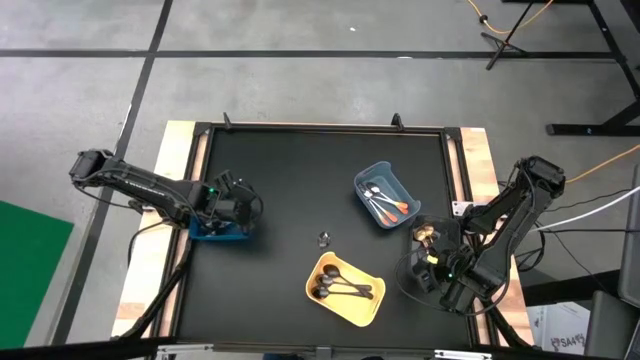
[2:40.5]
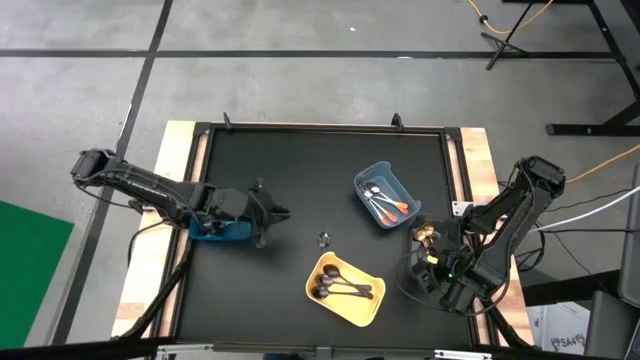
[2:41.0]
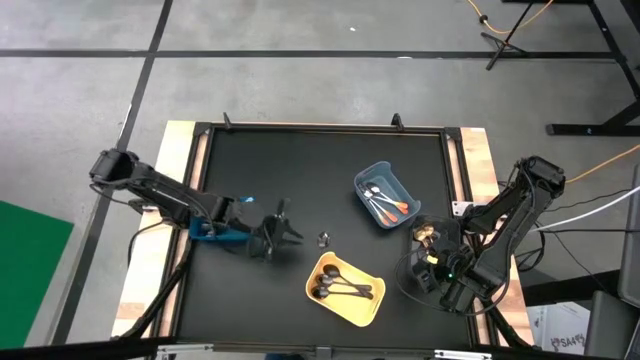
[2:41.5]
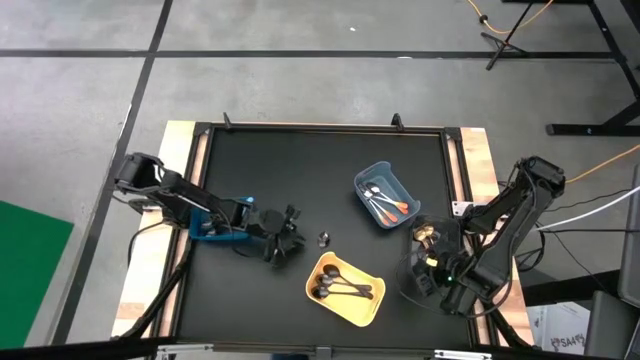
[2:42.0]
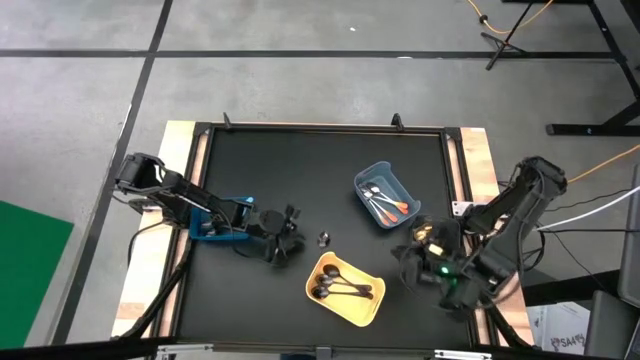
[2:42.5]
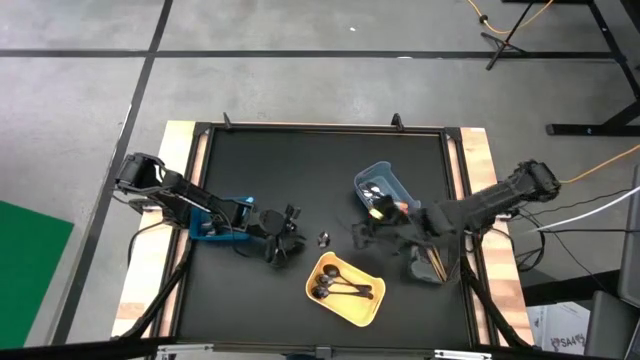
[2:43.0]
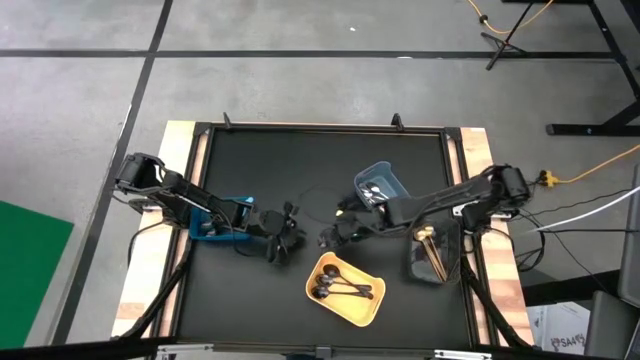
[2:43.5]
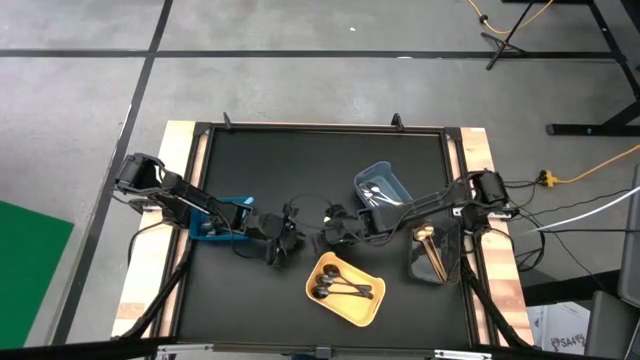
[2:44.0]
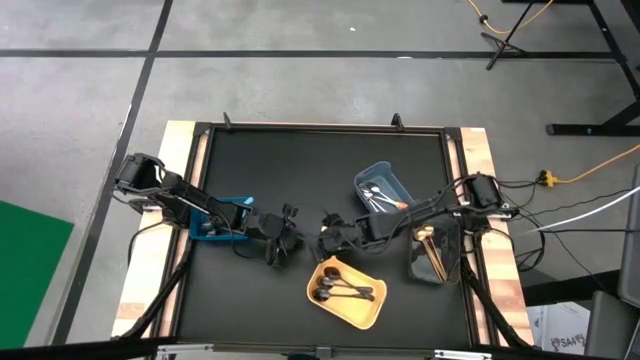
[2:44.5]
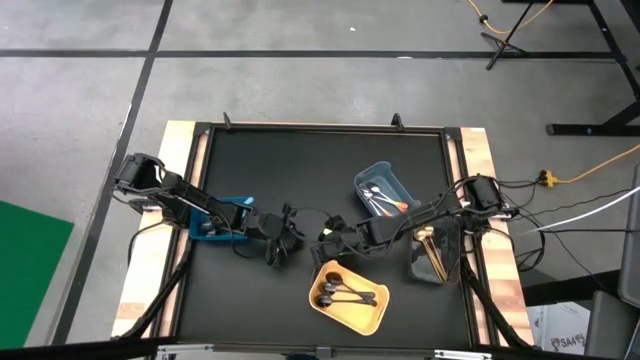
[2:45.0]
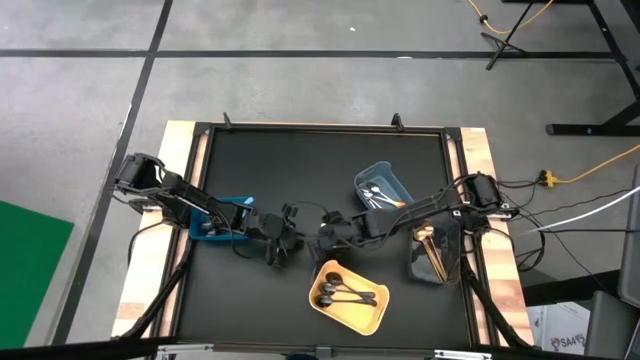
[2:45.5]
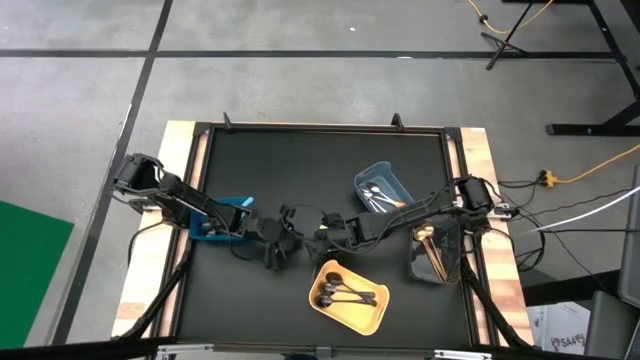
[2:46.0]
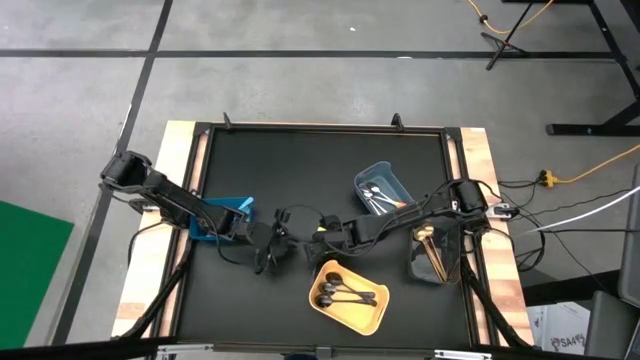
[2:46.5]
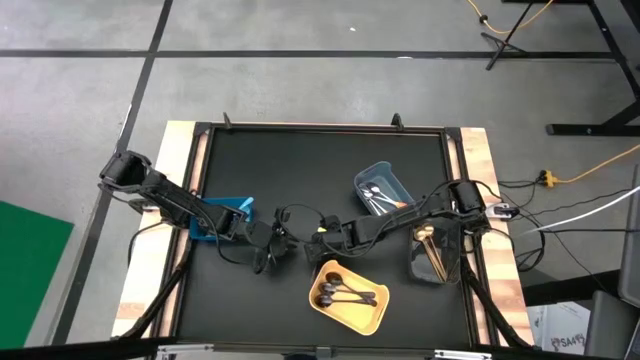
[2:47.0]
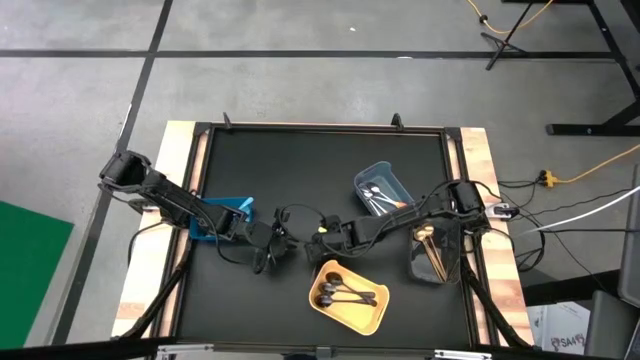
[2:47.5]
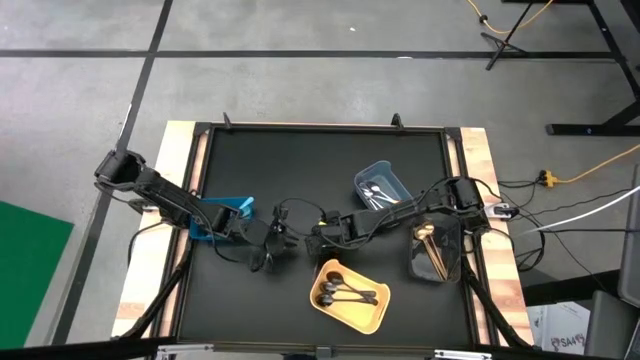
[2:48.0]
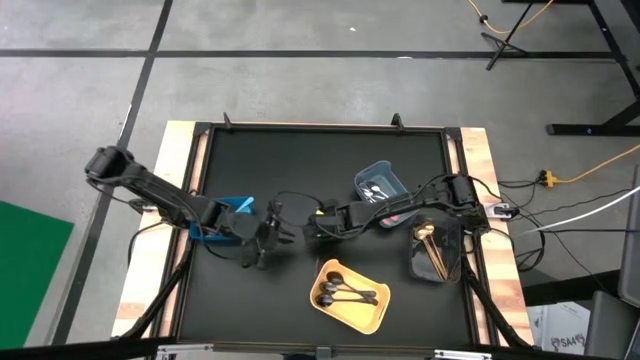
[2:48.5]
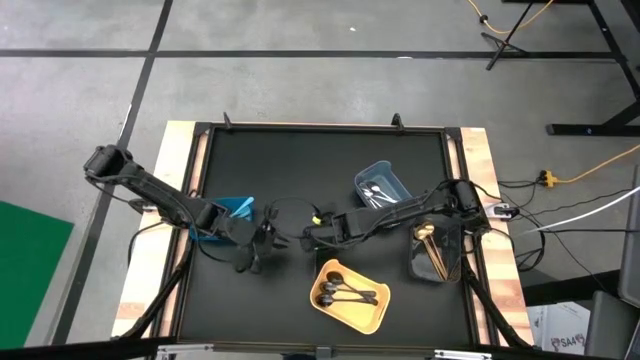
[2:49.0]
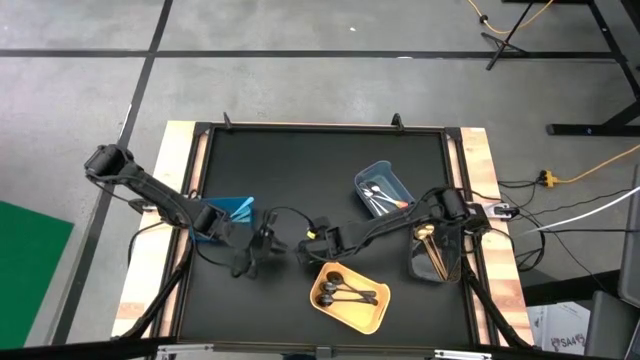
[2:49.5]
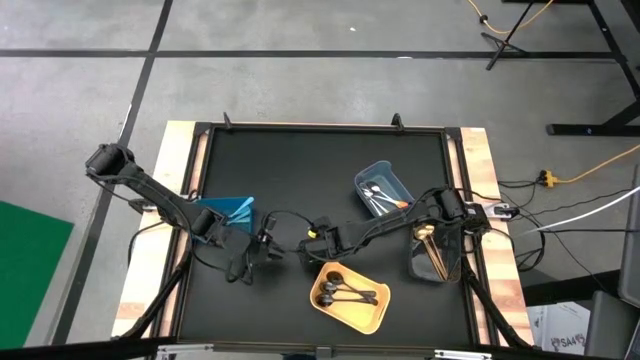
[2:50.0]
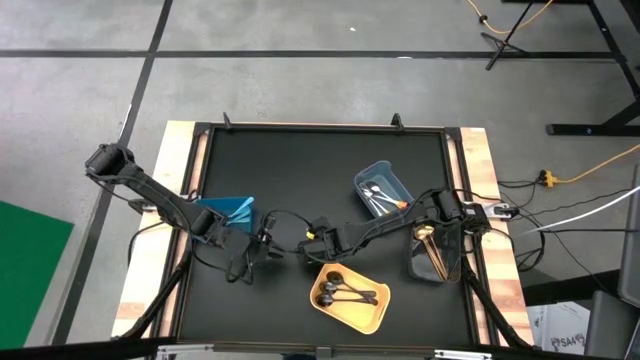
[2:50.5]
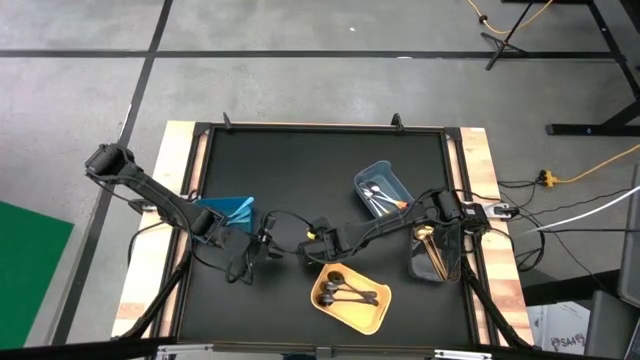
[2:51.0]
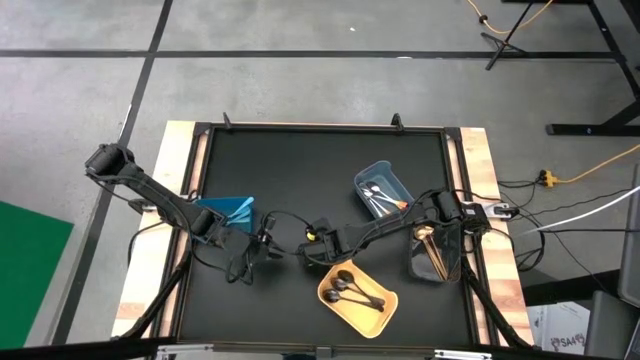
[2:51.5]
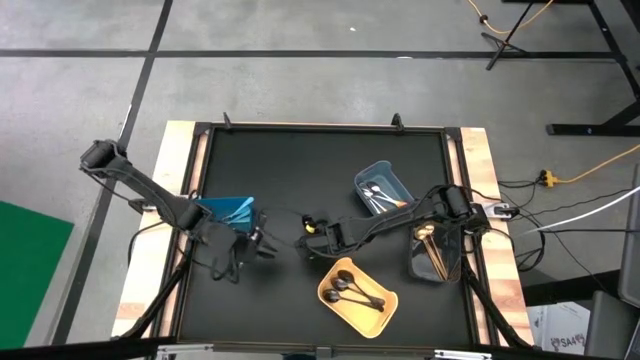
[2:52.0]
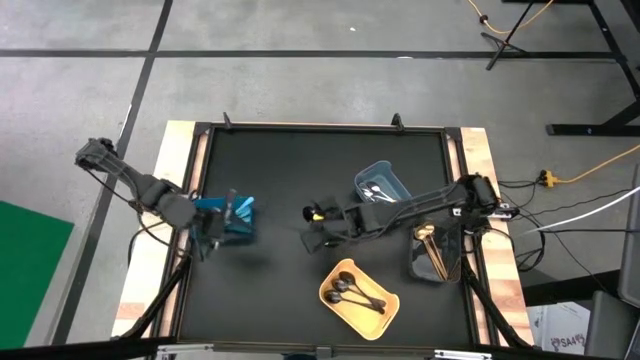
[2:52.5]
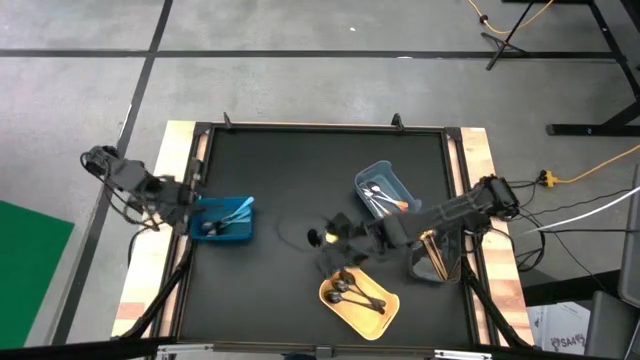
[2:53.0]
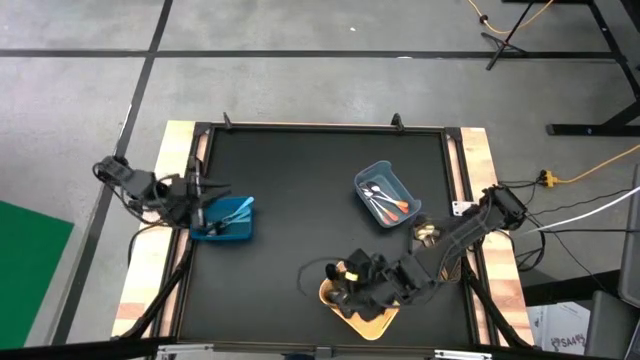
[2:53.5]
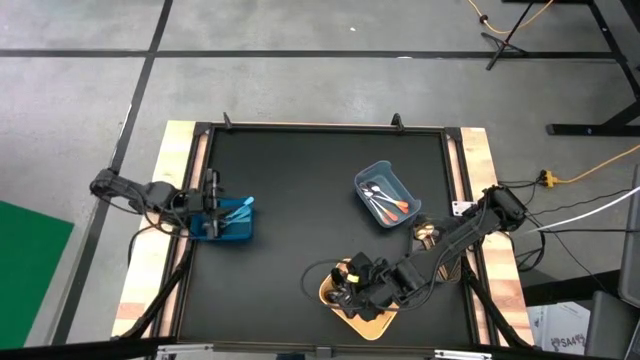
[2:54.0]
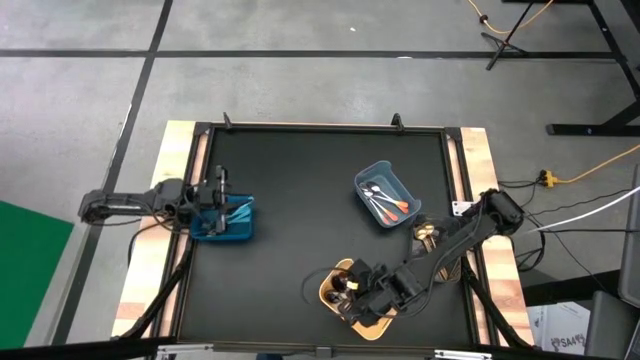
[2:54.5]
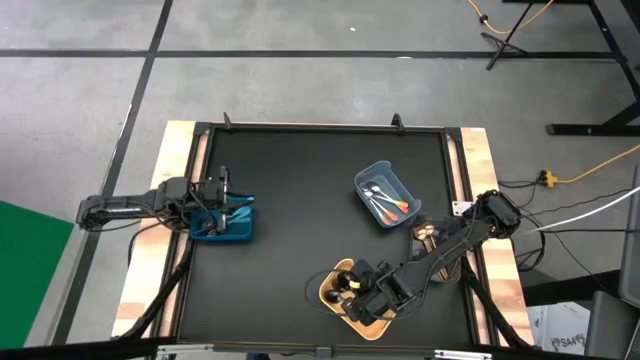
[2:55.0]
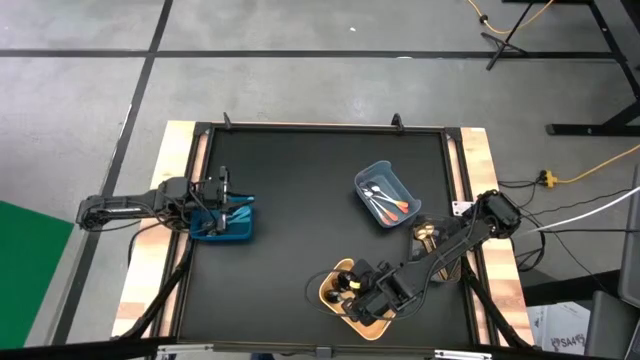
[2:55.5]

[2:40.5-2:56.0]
Task: Sort silverware by color (type)
Put the black spoon into the yellow bin

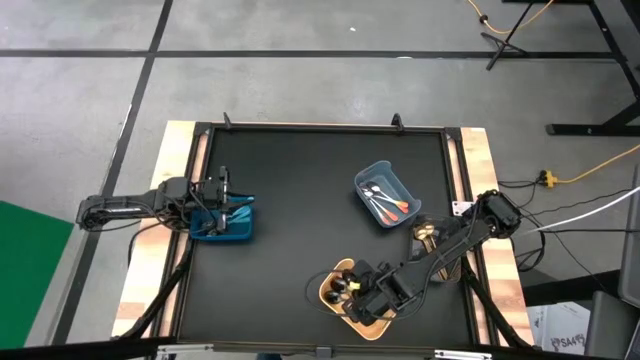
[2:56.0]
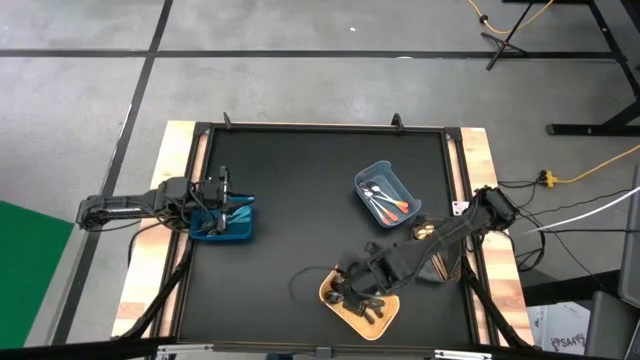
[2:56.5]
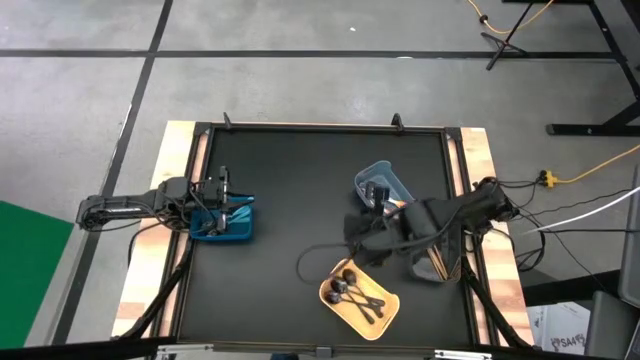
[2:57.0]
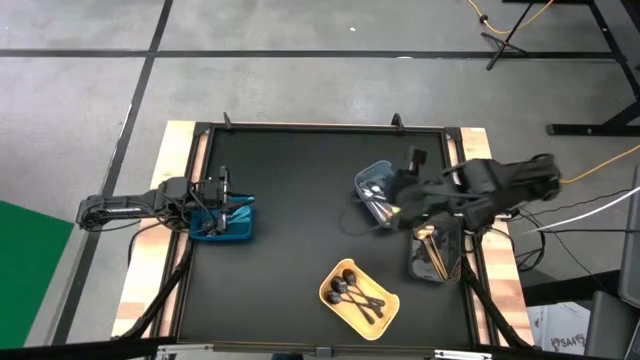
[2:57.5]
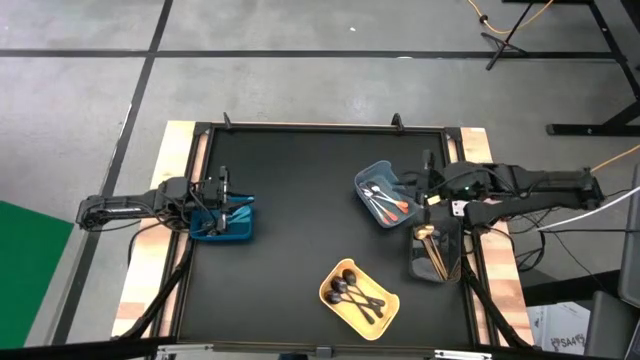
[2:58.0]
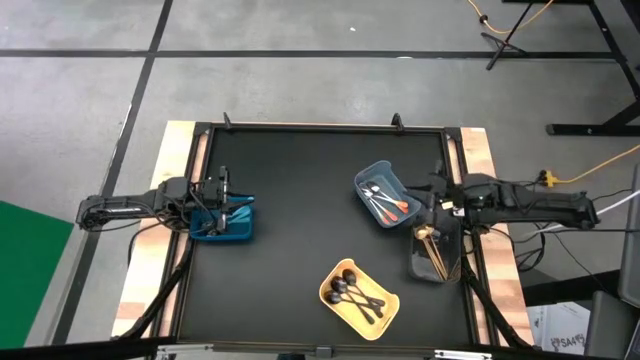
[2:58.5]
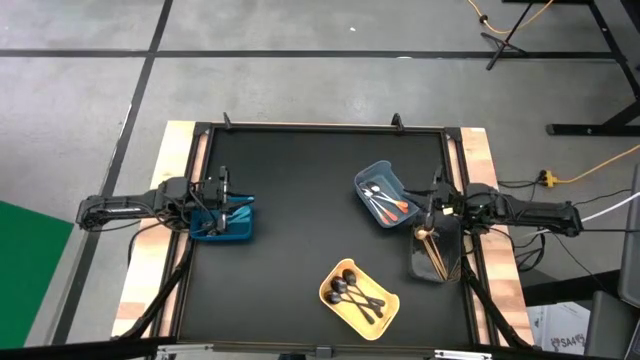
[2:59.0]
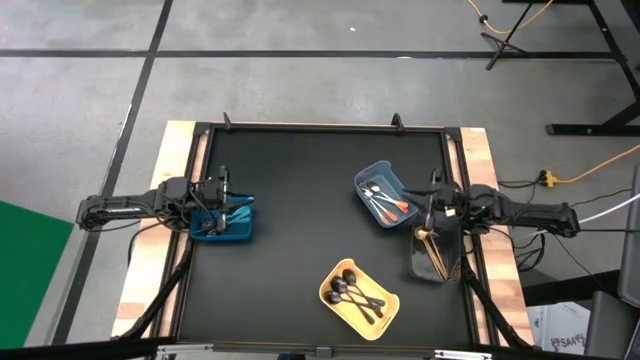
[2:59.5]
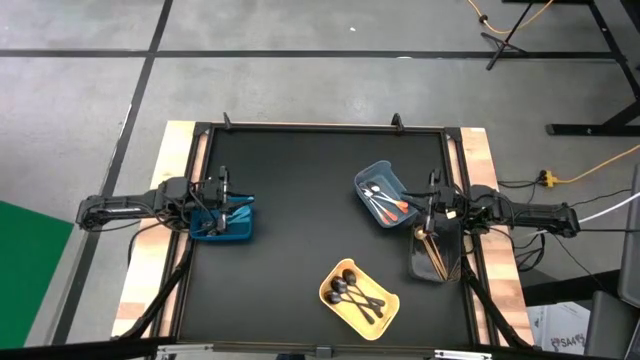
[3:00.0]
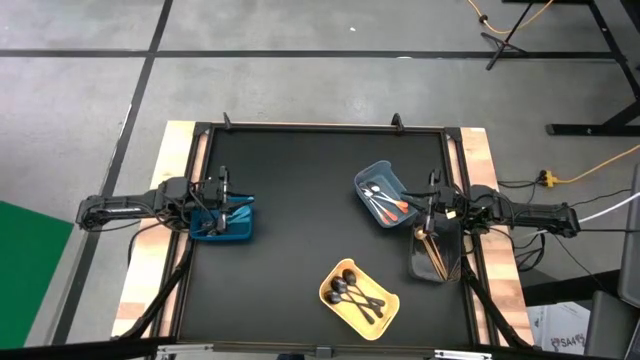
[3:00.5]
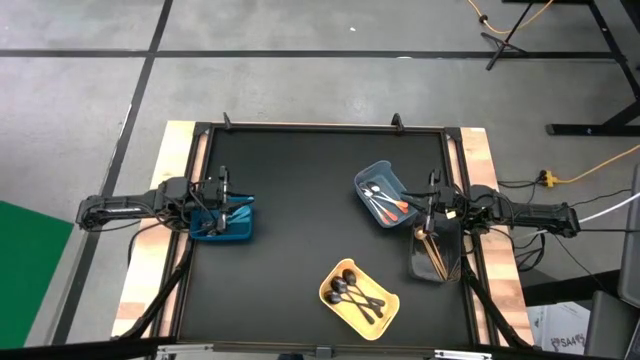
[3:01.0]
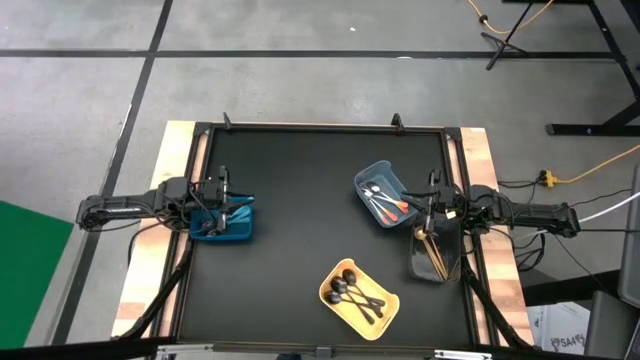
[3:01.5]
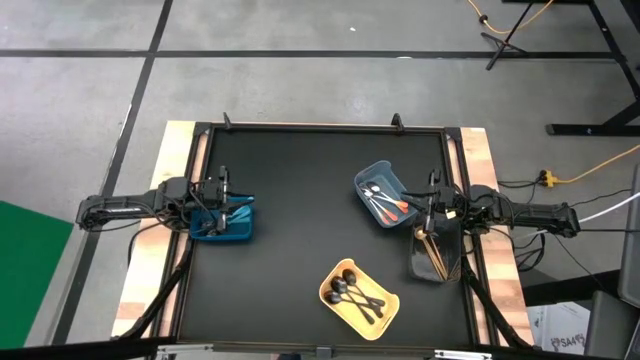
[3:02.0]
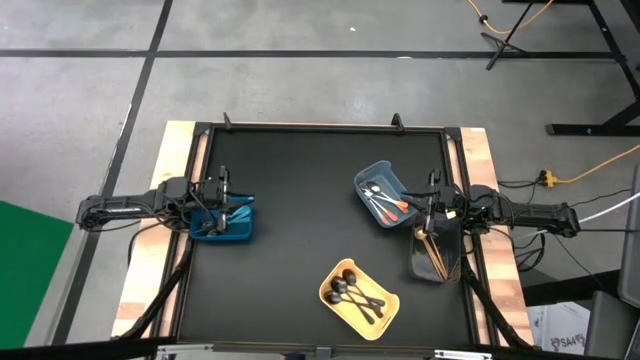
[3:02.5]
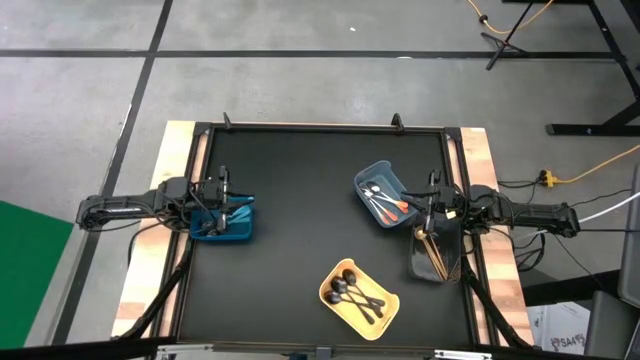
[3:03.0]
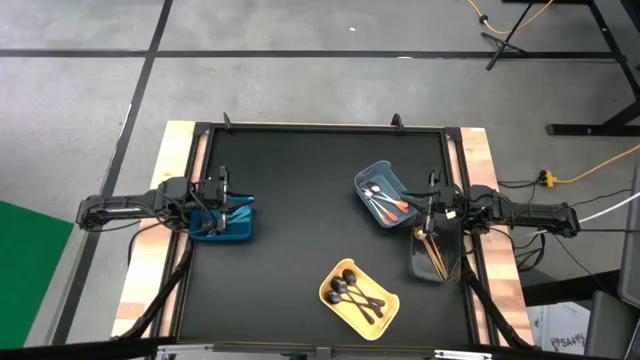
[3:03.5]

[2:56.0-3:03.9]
Return to Home Position
